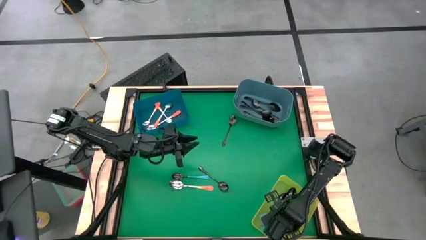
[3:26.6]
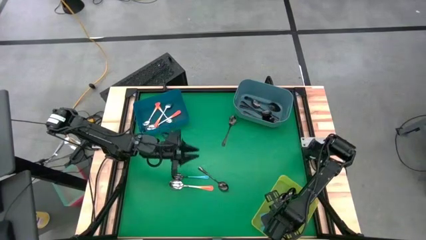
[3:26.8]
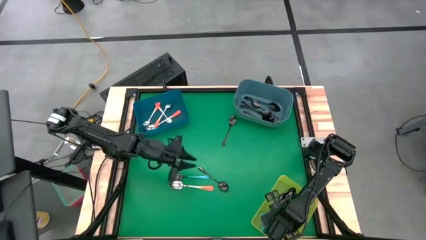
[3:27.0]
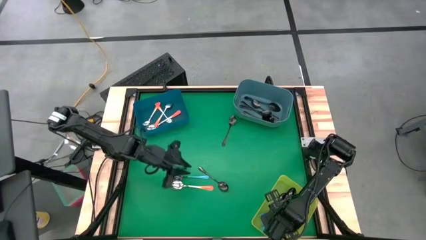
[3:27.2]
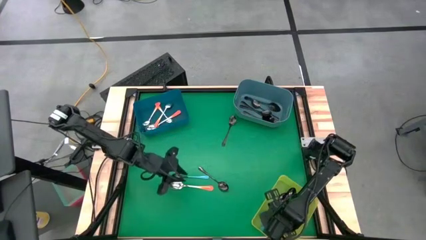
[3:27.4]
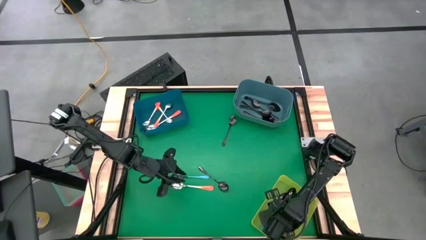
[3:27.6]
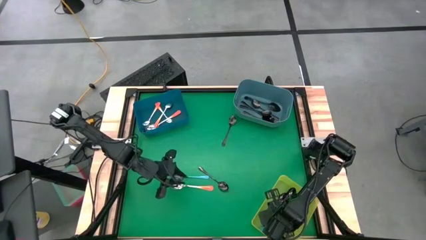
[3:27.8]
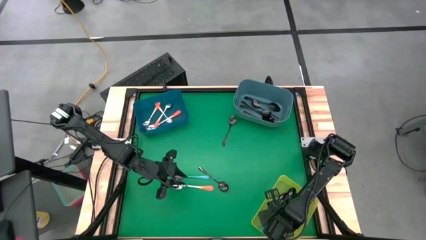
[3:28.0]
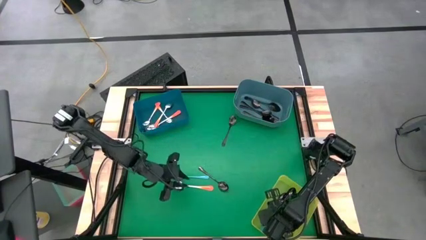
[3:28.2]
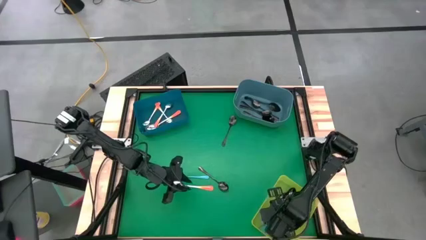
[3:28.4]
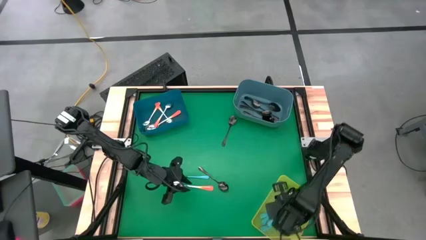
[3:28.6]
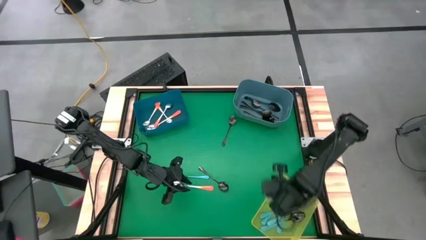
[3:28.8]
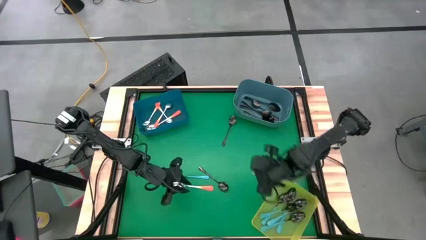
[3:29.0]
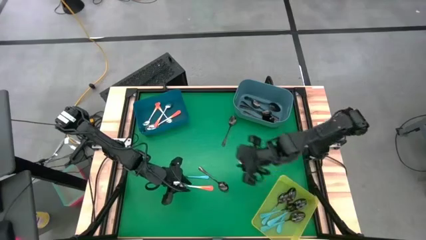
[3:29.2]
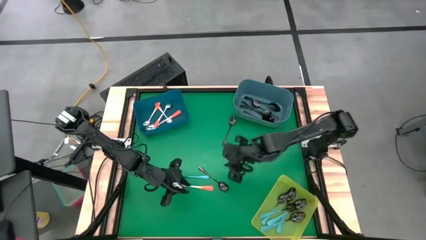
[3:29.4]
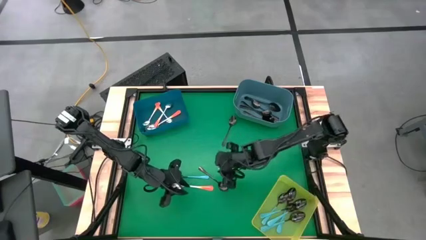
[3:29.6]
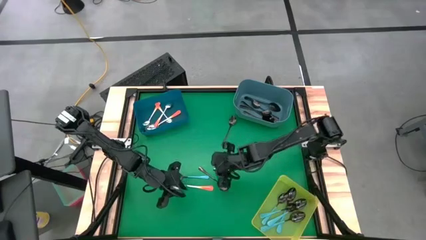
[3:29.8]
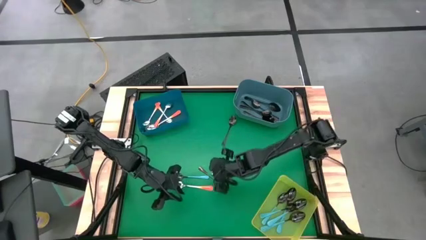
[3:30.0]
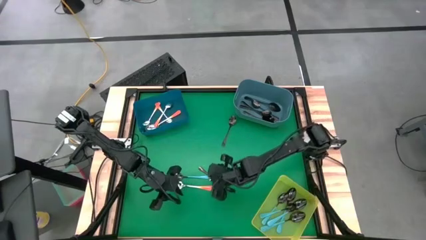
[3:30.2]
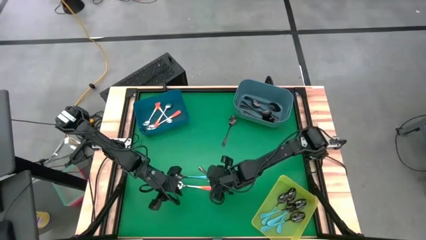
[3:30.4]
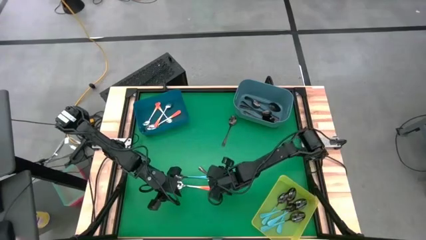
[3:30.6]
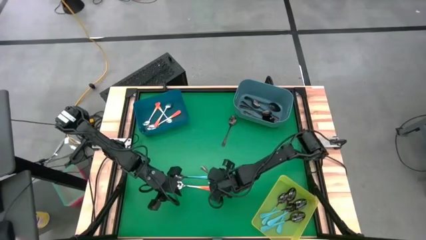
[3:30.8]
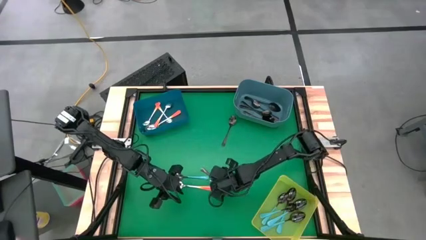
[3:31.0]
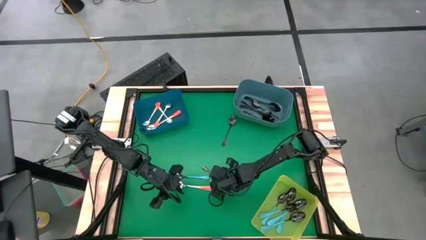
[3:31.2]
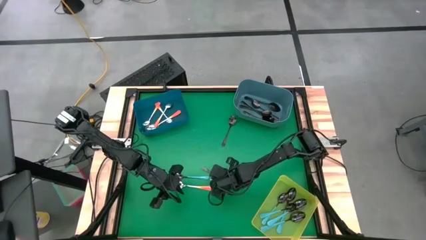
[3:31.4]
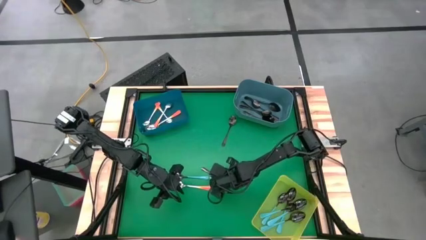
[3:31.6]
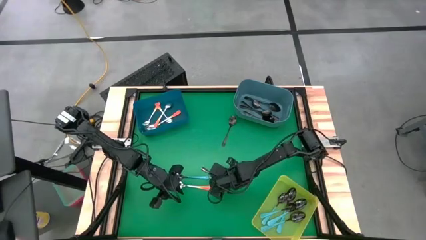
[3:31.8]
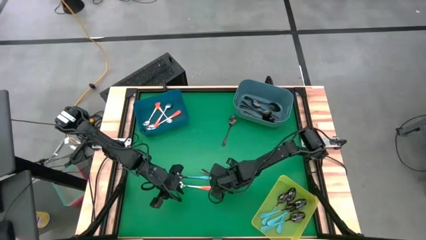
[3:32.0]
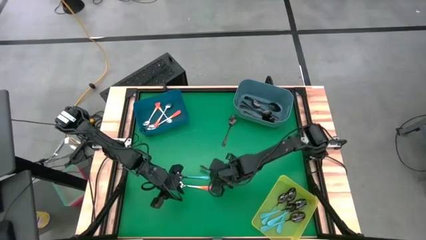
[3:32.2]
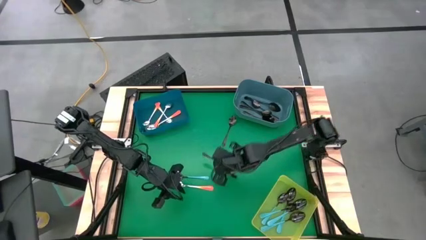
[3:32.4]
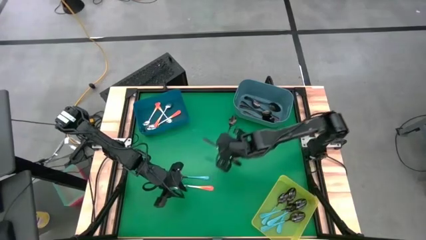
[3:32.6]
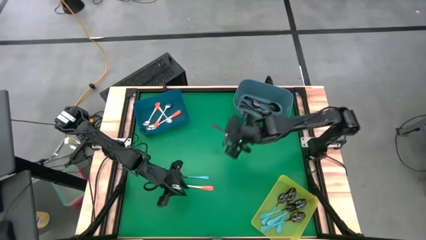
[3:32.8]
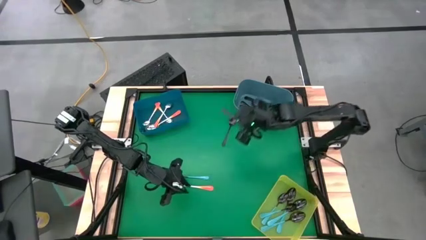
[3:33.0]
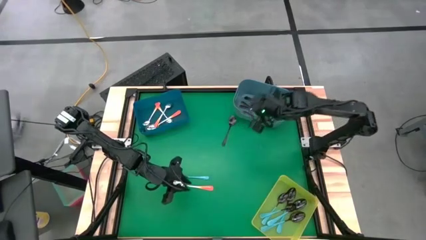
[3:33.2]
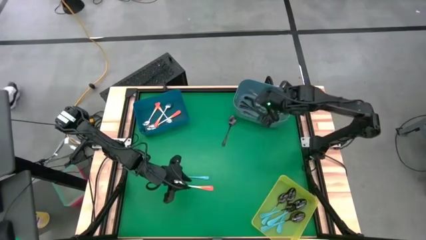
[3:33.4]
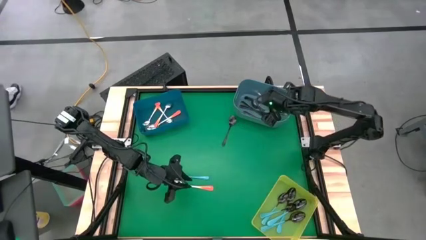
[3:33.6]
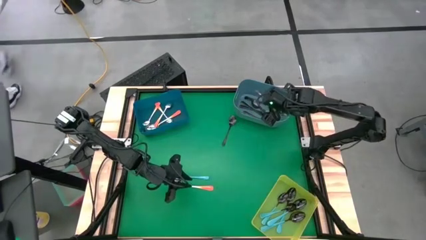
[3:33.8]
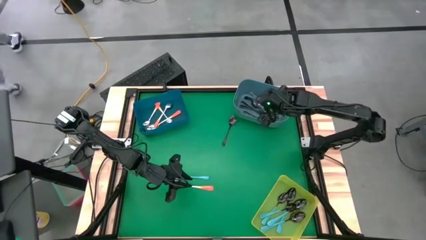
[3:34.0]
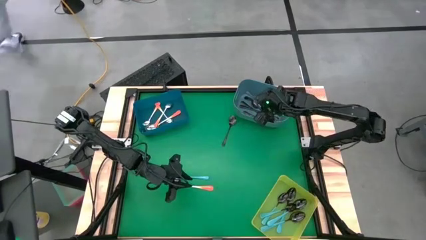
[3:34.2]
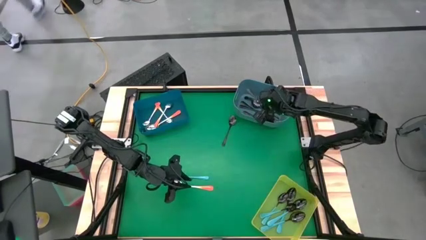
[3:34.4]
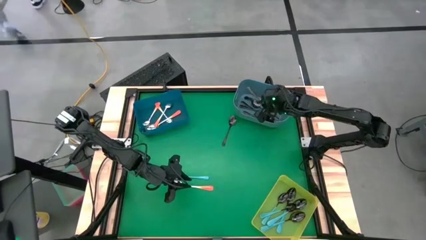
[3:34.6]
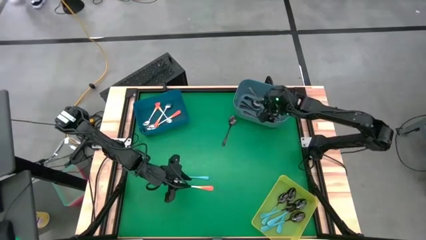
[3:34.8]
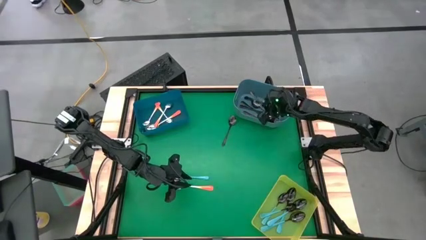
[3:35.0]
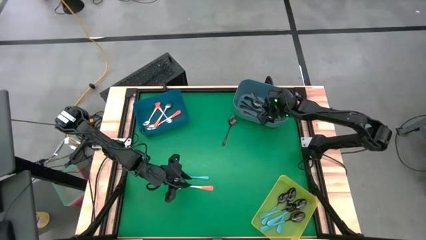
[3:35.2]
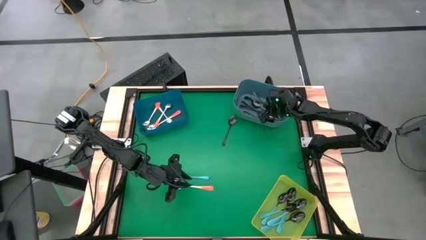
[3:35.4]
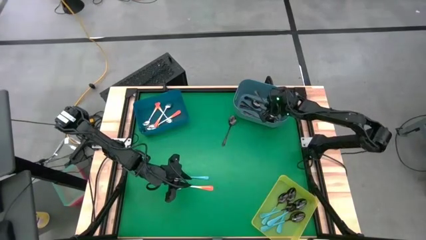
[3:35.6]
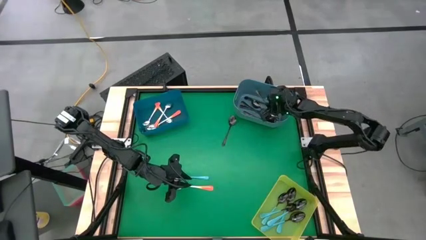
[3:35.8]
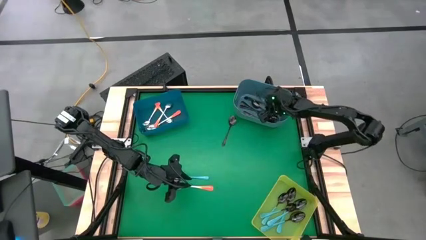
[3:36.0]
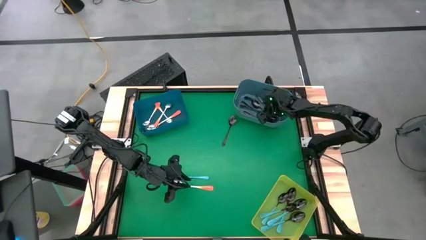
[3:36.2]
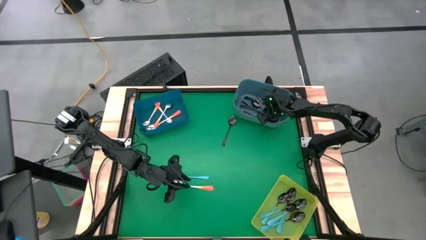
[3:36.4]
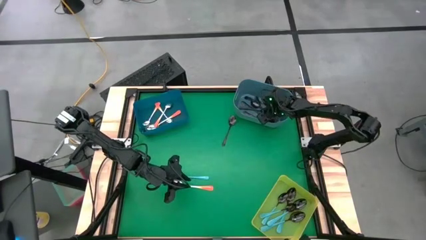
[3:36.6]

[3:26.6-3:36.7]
Task: Sort silverware by color (type)
Put the black spoon into the blue bin
